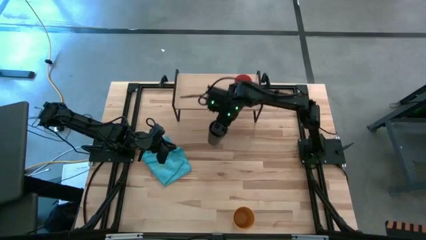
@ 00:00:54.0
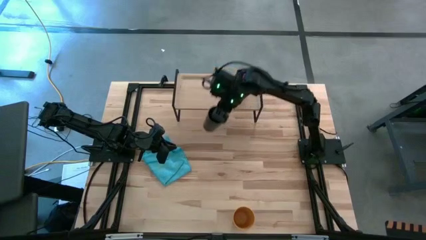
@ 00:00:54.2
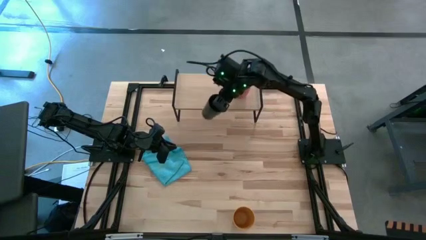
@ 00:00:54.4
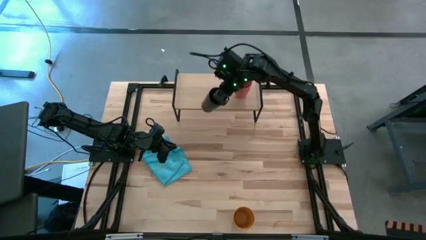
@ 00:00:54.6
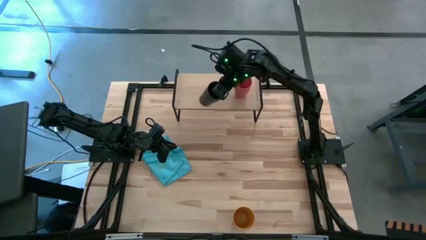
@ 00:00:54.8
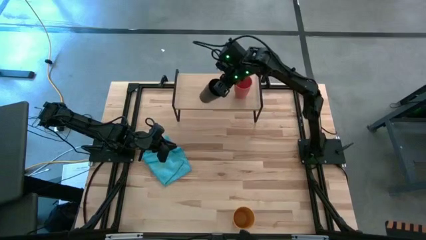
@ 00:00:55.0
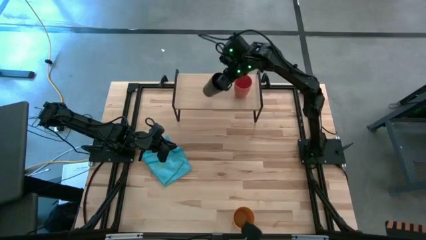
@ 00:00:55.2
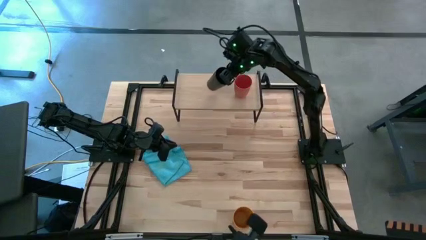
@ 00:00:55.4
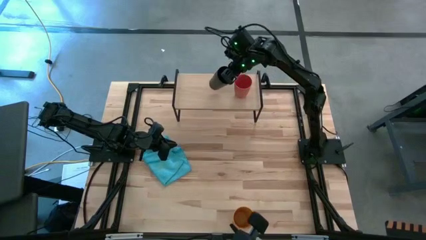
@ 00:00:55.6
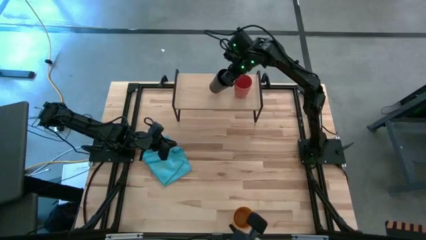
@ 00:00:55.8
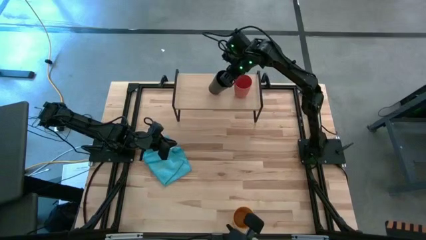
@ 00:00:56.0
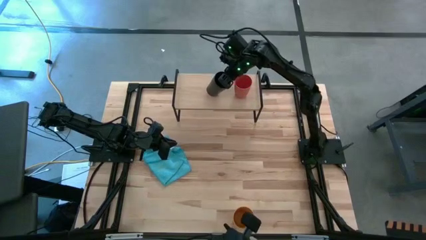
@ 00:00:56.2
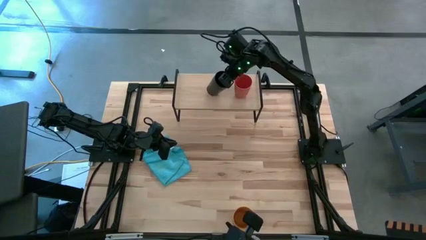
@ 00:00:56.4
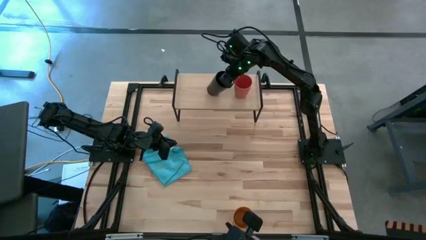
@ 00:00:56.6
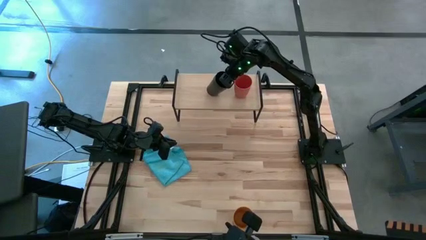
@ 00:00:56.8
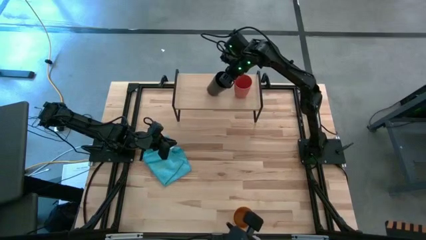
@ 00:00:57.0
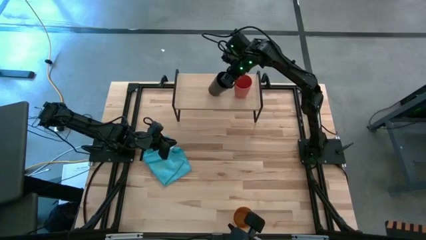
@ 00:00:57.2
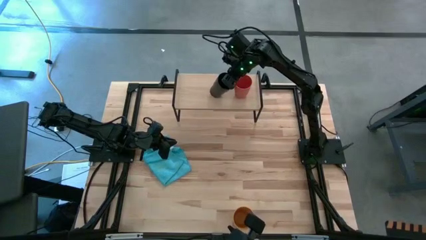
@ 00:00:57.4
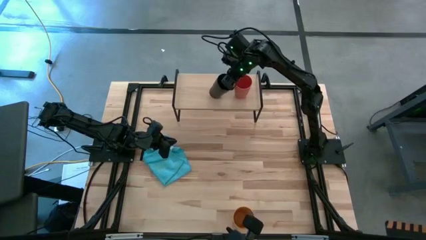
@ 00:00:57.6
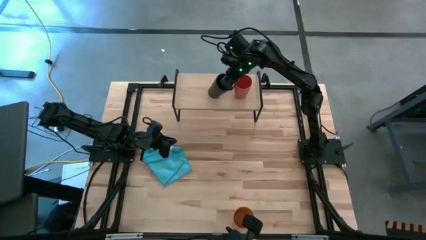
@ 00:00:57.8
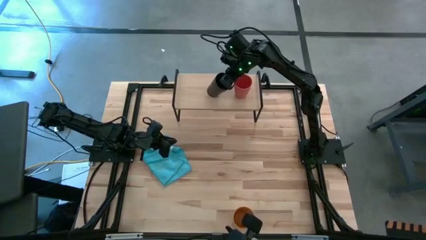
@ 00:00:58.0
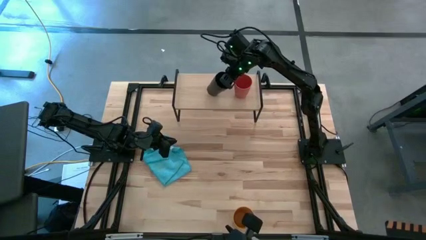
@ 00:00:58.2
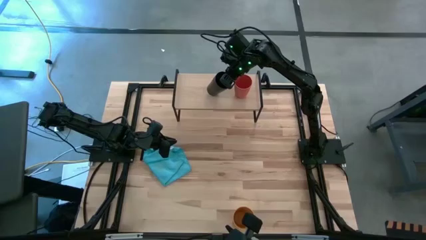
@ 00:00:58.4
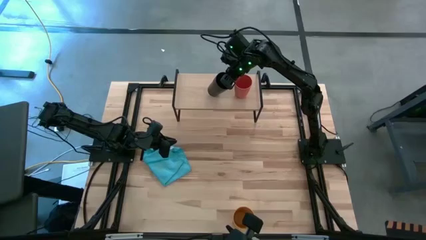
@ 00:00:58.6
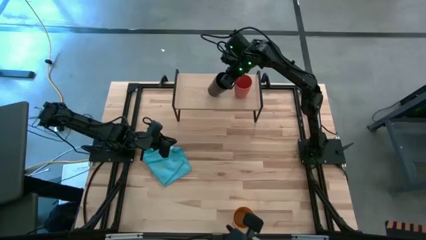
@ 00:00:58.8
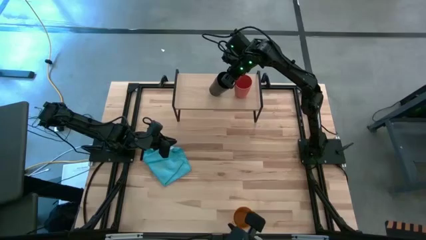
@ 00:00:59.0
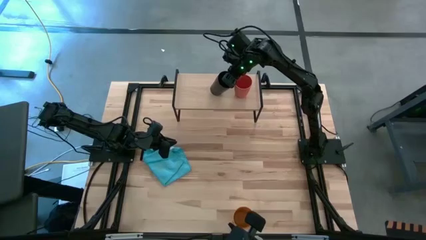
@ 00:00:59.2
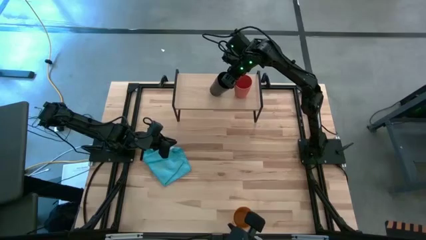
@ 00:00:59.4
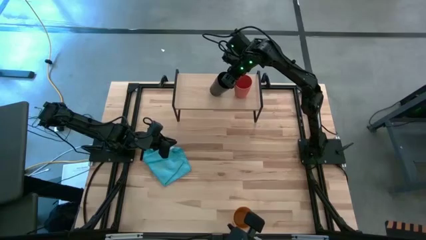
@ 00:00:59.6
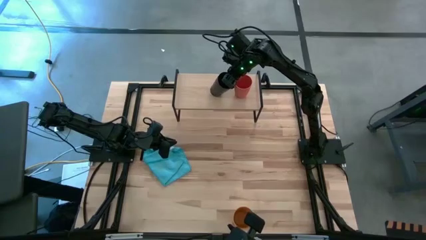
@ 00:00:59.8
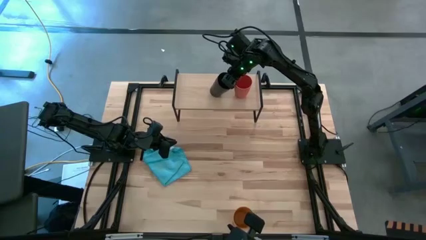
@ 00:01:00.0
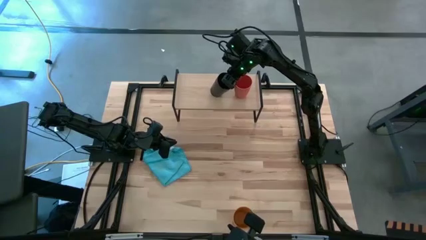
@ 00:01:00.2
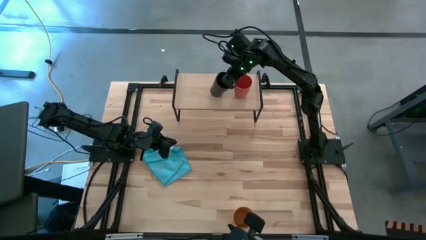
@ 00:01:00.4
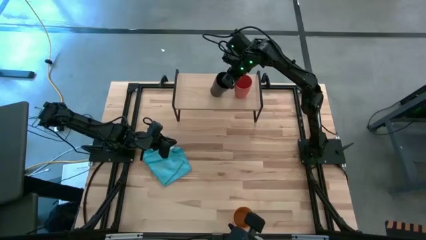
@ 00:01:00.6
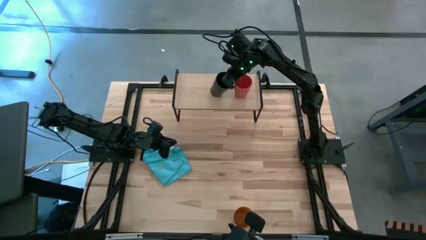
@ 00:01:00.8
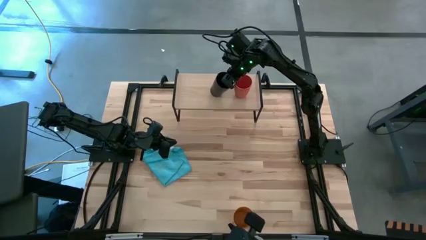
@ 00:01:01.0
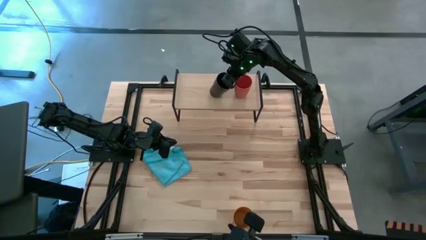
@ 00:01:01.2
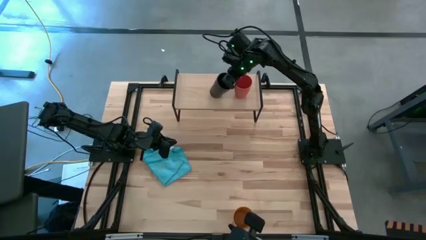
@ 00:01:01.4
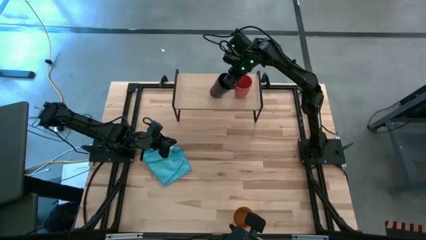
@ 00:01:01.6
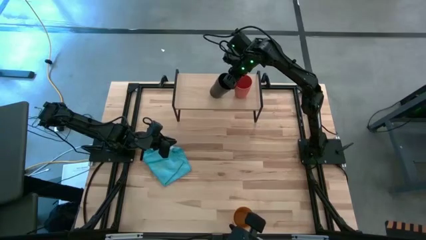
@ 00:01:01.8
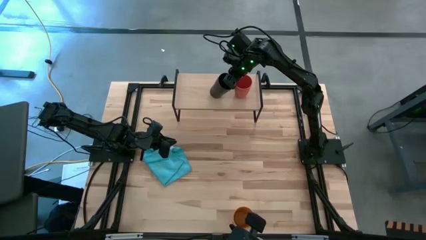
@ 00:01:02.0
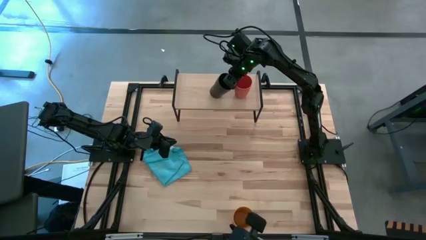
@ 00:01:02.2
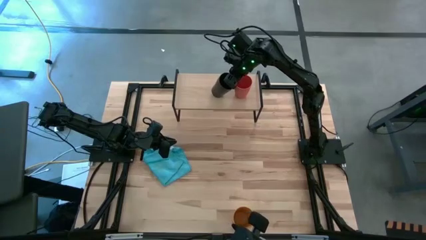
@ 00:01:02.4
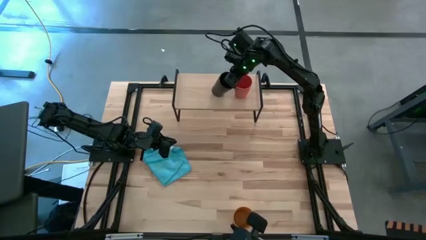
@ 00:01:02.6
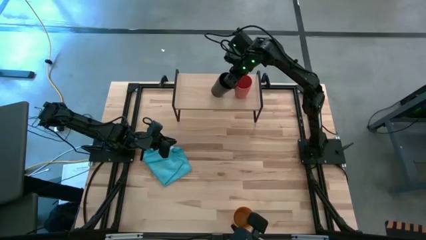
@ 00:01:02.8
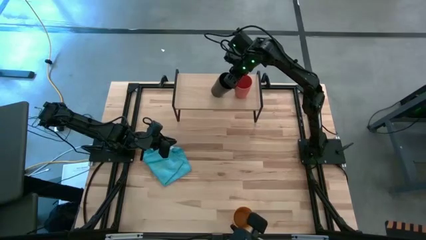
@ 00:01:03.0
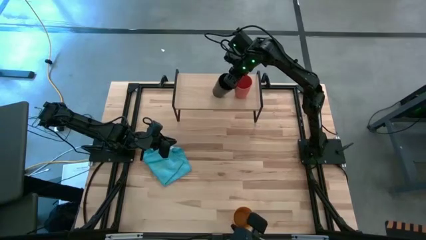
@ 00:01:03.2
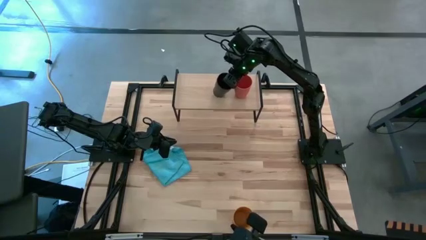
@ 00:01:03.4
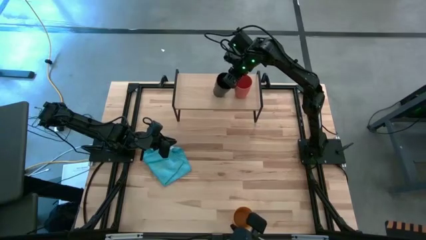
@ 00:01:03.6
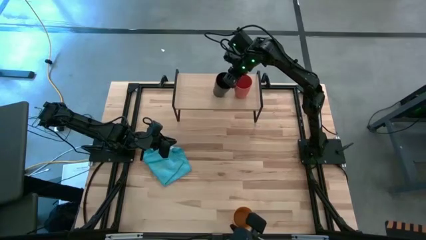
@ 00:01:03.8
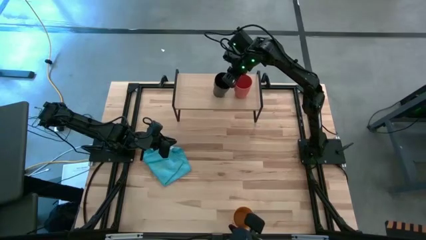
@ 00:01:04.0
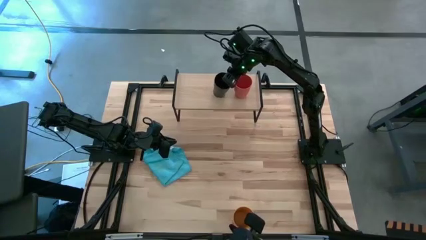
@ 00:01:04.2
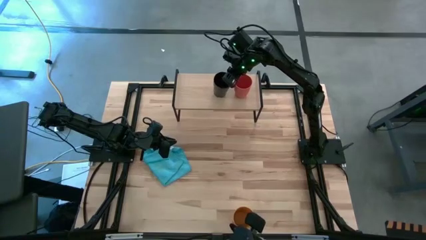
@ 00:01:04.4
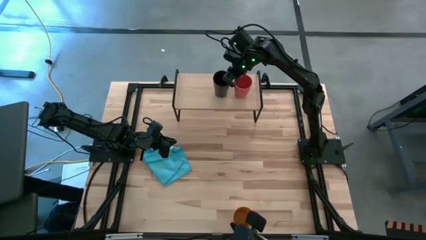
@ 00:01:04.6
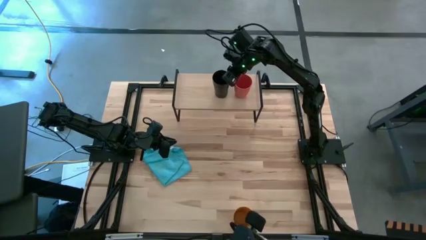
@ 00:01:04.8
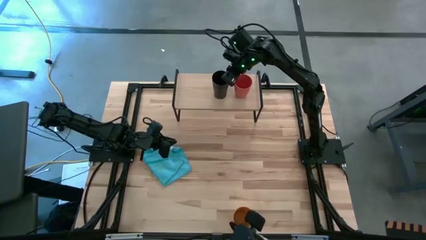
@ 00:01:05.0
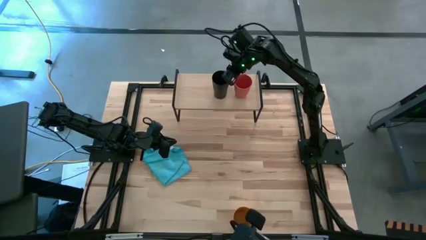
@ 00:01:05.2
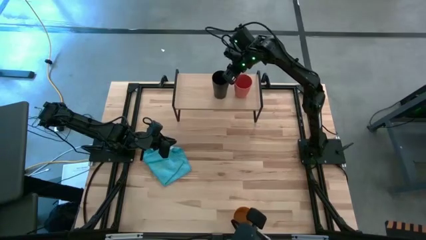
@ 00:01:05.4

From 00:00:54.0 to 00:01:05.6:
Task: Stack small to large cups/mugs on shelf
Put the black cup on the shelf

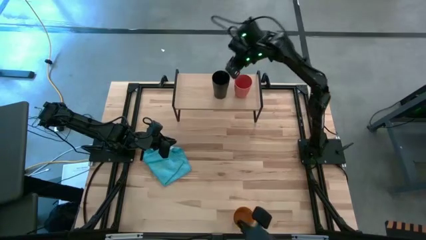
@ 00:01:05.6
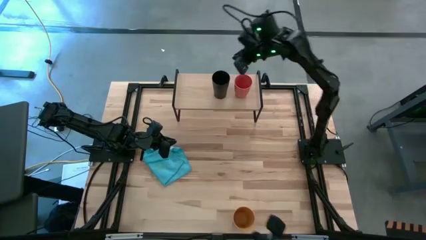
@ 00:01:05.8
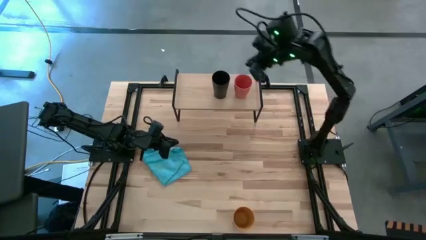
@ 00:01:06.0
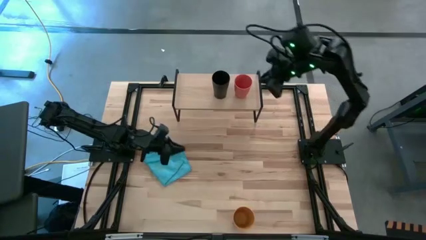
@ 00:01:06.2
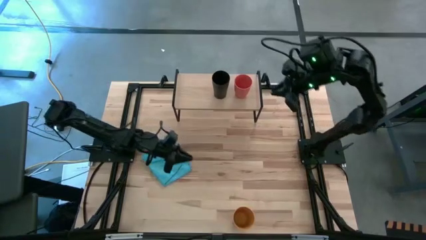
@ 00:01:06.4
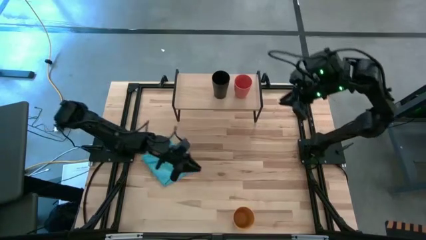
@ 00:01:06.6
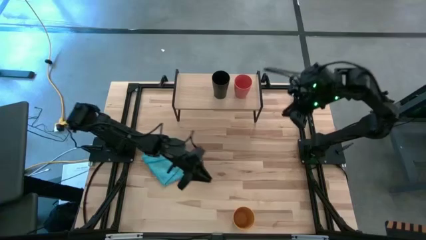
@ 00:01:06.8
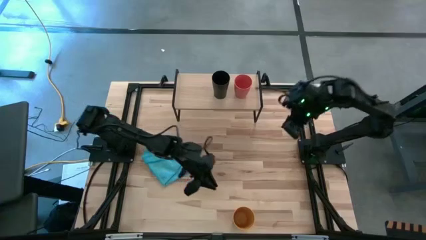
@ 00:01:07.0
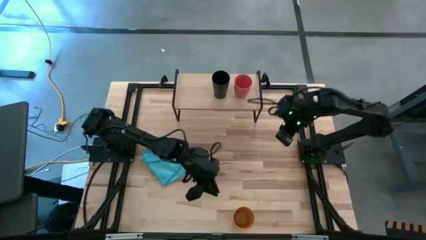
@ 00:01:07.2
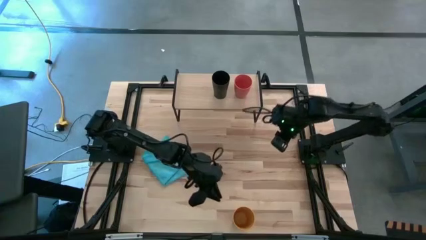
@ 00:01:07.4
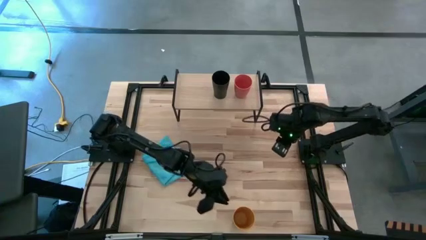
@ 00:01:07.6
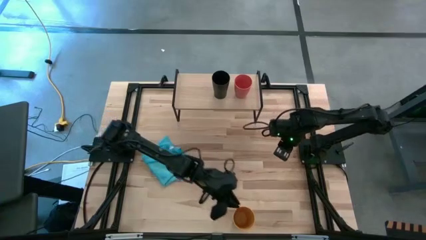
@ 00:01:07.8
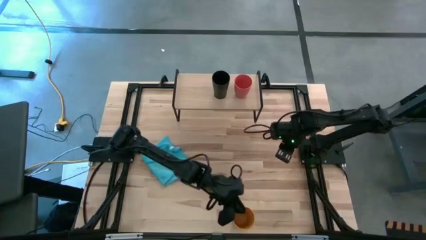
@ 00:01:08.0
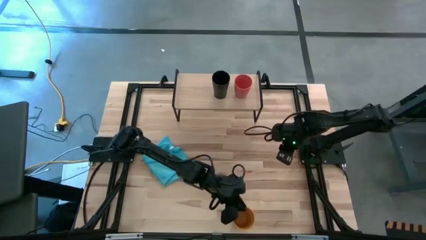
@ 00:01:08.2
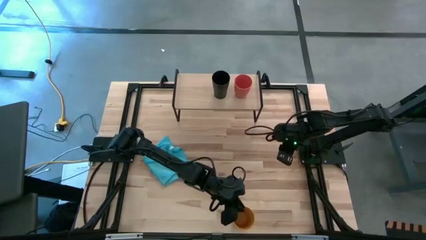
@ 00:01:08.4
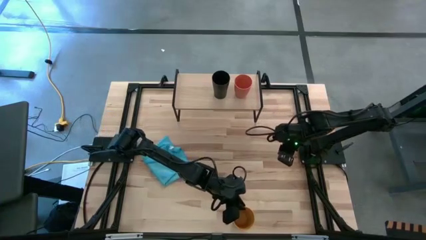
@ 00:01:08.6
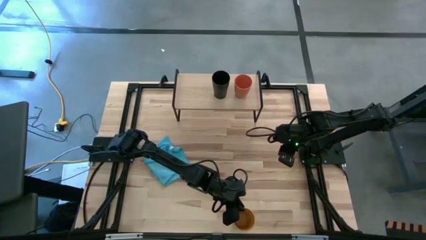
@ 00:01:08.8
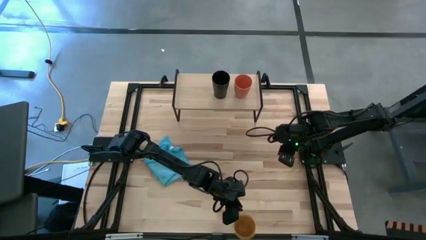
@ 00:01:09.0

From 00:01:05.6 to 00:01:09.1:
Put the yellow cup on the shelf
